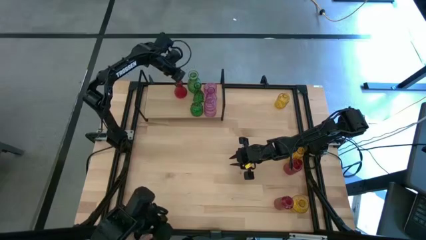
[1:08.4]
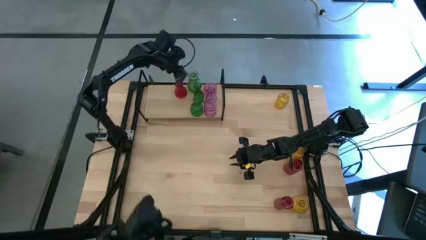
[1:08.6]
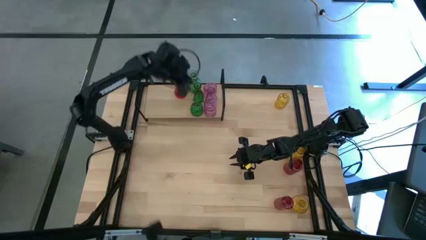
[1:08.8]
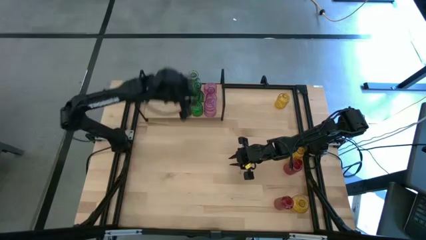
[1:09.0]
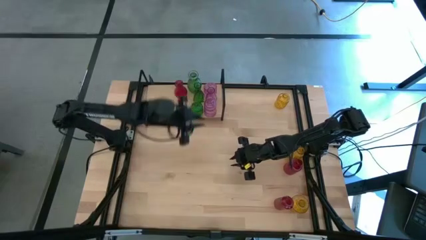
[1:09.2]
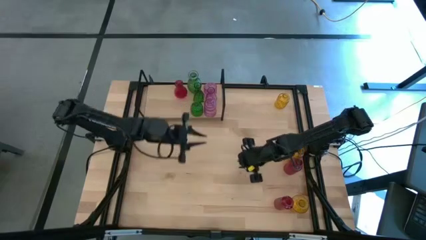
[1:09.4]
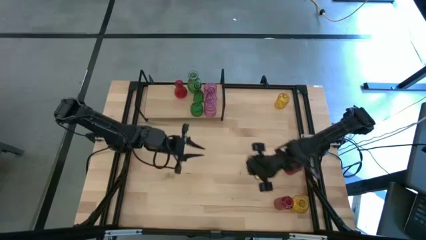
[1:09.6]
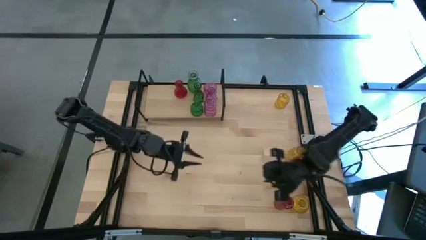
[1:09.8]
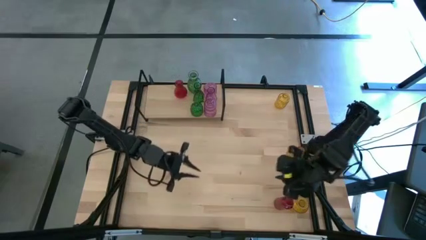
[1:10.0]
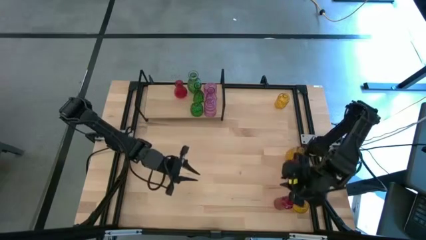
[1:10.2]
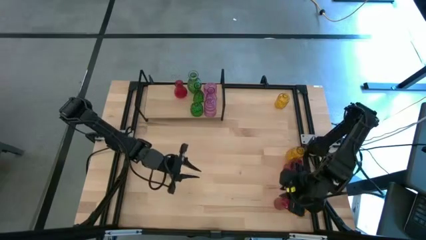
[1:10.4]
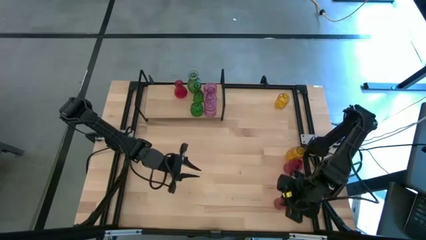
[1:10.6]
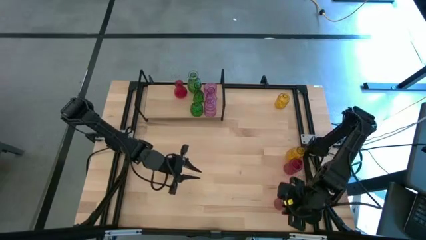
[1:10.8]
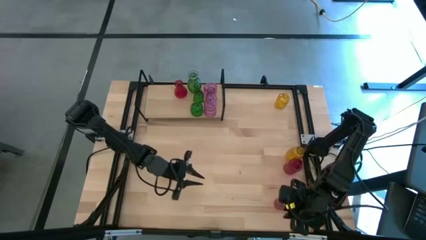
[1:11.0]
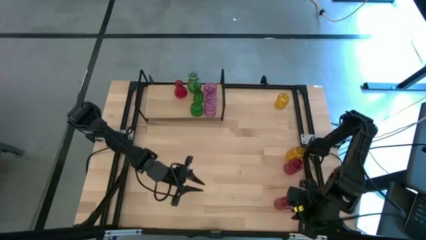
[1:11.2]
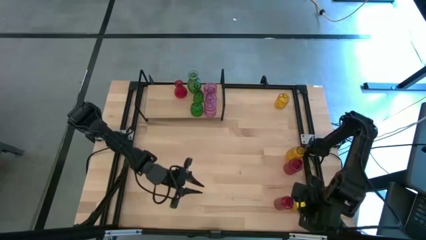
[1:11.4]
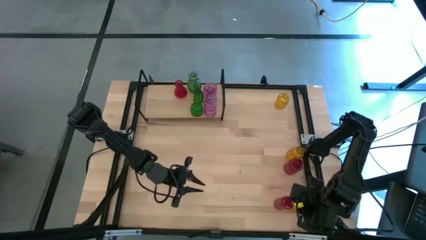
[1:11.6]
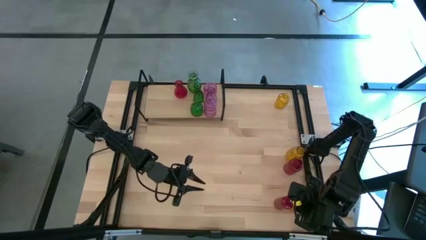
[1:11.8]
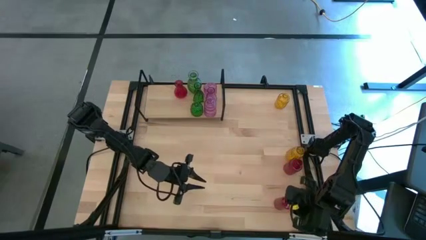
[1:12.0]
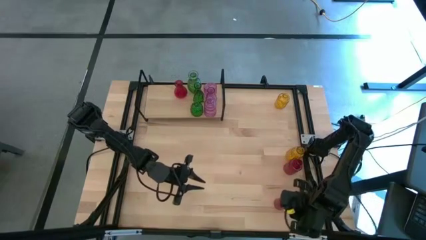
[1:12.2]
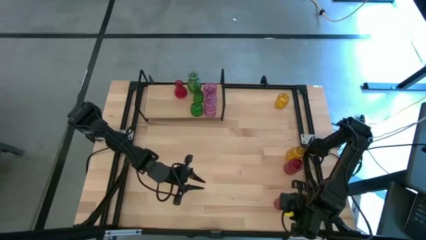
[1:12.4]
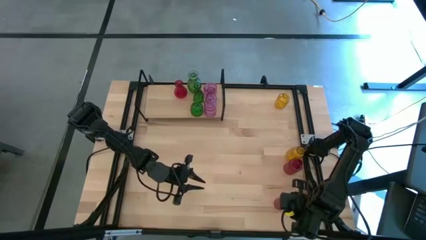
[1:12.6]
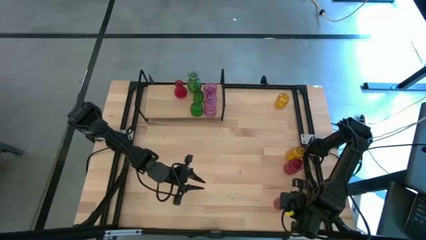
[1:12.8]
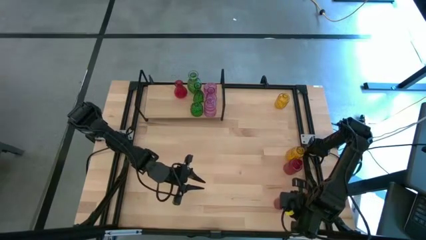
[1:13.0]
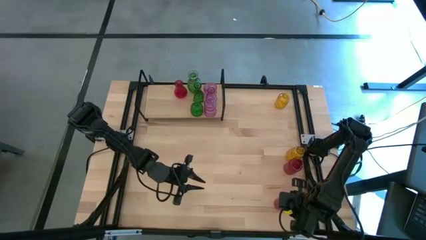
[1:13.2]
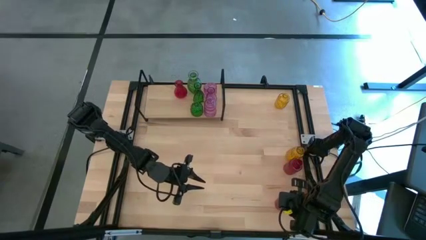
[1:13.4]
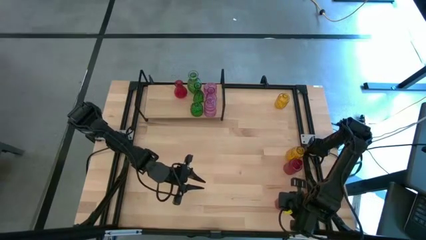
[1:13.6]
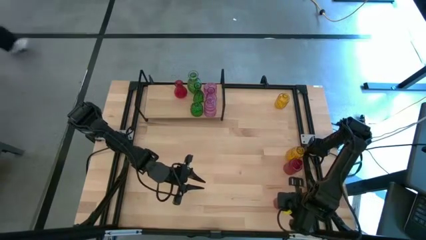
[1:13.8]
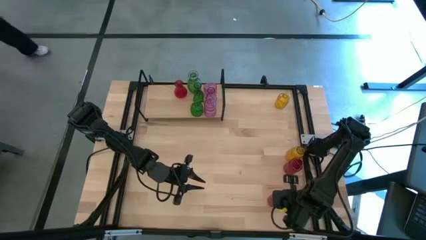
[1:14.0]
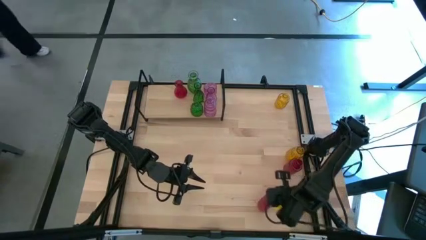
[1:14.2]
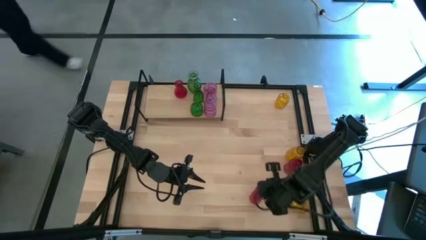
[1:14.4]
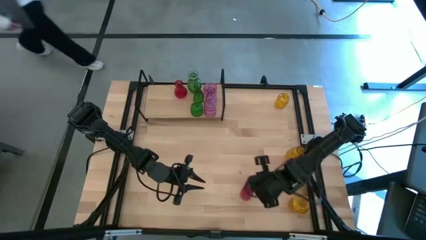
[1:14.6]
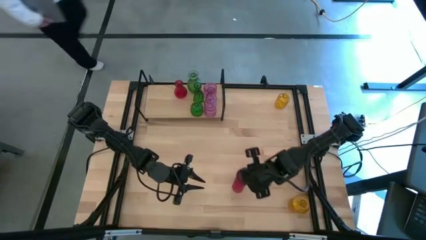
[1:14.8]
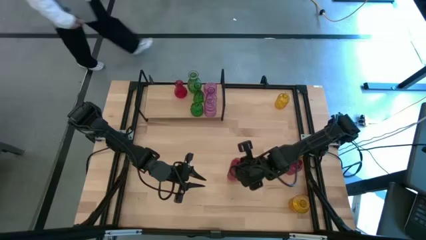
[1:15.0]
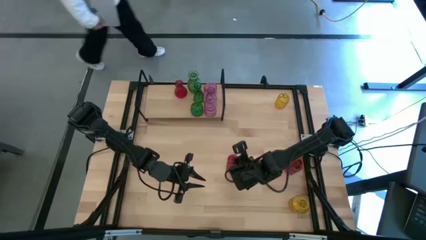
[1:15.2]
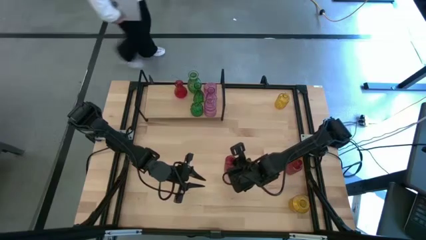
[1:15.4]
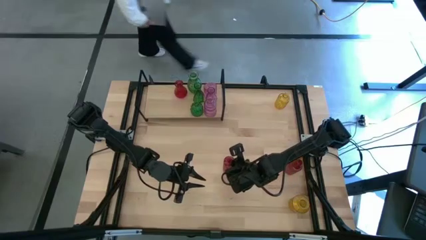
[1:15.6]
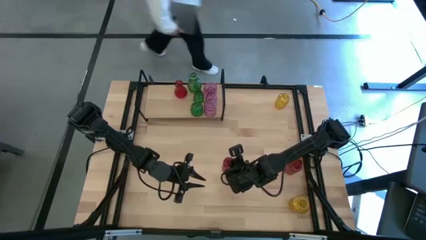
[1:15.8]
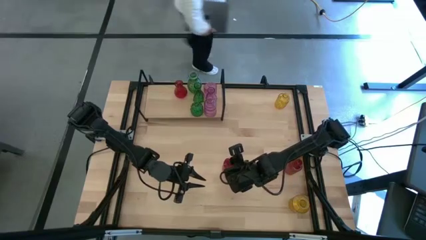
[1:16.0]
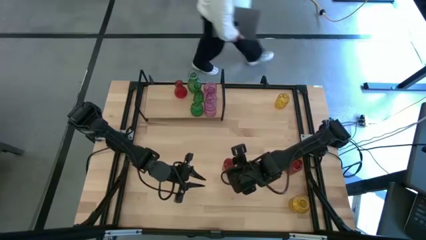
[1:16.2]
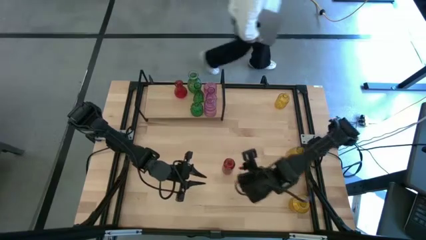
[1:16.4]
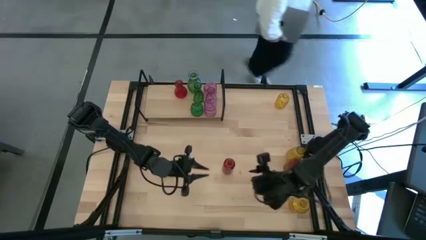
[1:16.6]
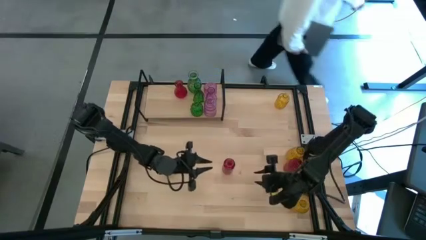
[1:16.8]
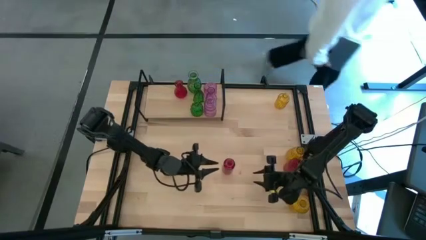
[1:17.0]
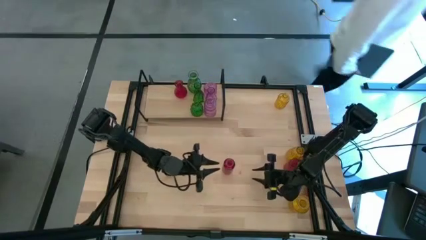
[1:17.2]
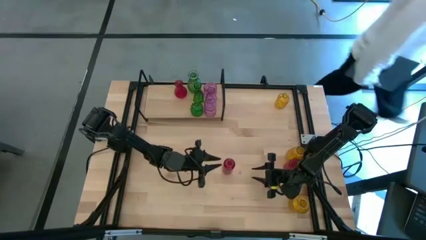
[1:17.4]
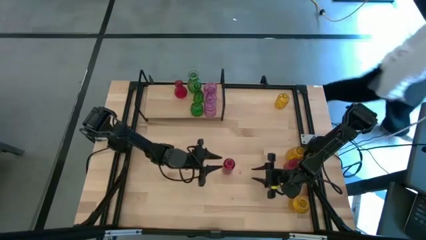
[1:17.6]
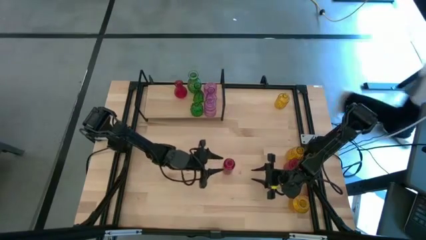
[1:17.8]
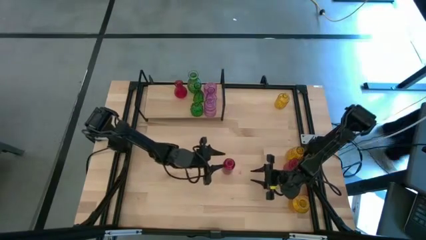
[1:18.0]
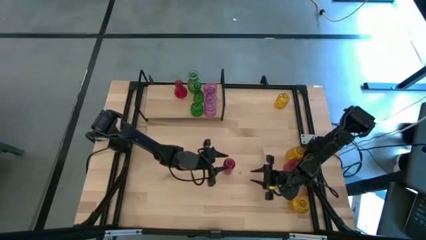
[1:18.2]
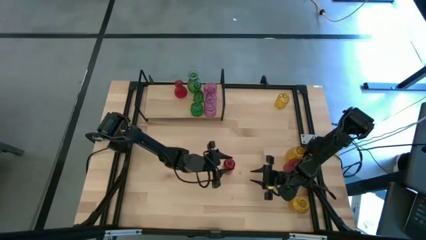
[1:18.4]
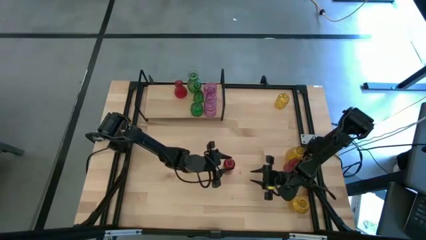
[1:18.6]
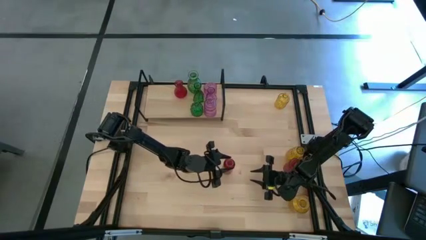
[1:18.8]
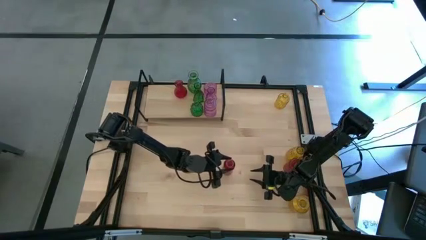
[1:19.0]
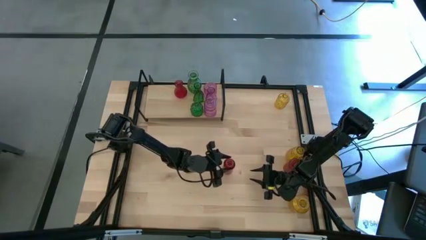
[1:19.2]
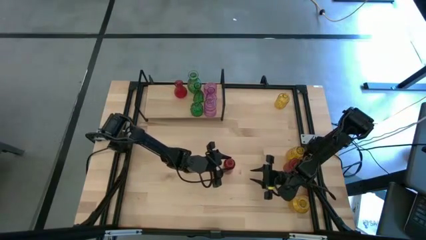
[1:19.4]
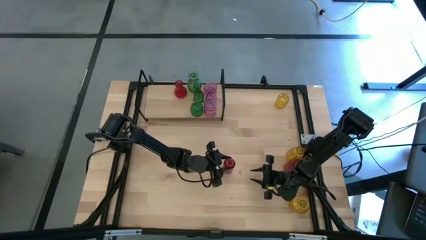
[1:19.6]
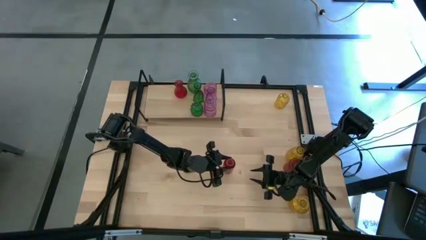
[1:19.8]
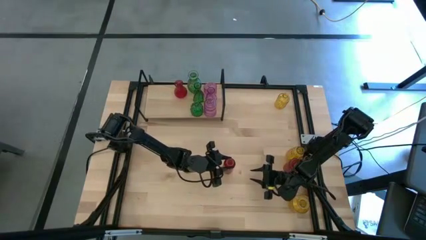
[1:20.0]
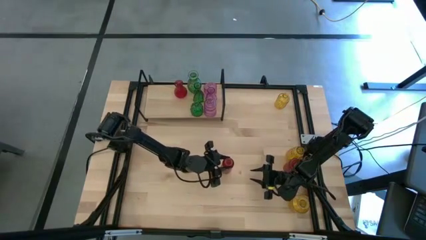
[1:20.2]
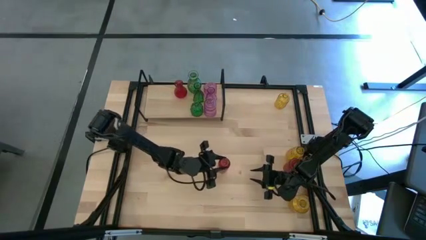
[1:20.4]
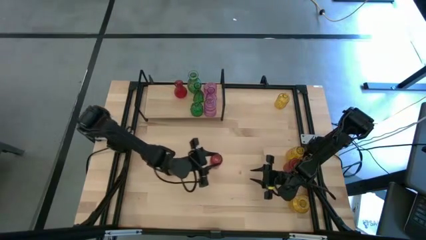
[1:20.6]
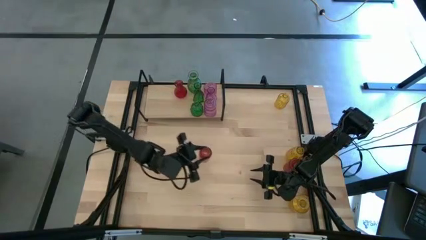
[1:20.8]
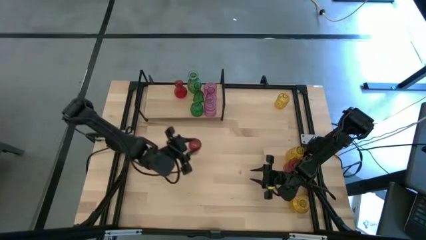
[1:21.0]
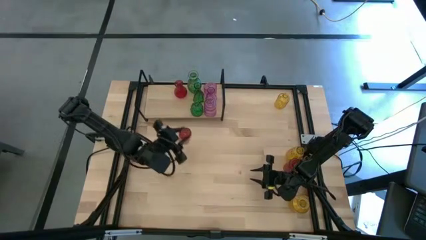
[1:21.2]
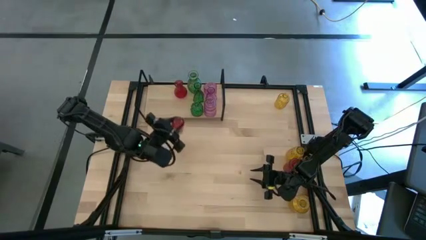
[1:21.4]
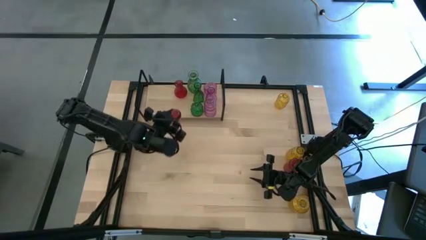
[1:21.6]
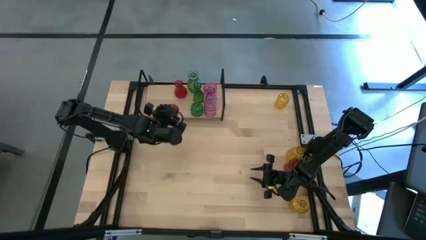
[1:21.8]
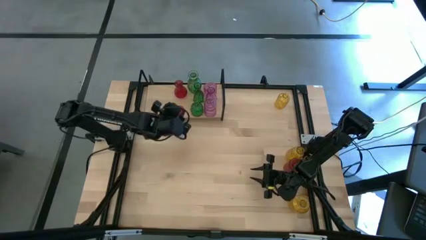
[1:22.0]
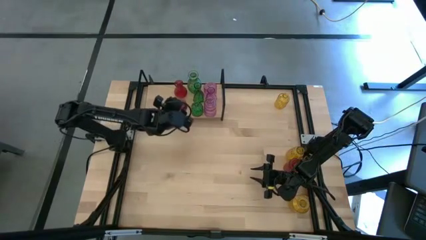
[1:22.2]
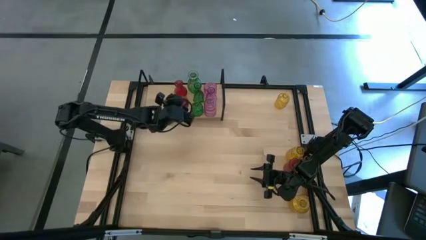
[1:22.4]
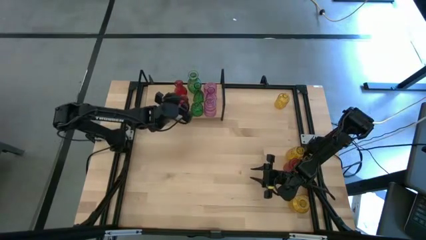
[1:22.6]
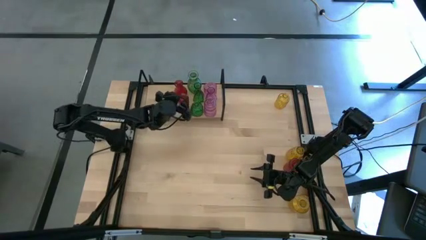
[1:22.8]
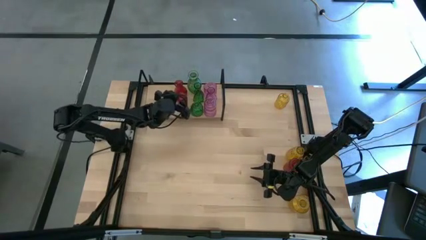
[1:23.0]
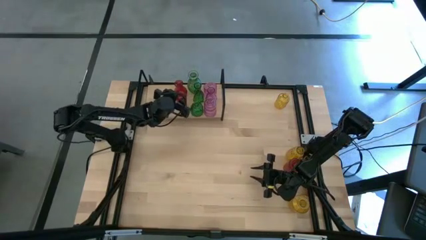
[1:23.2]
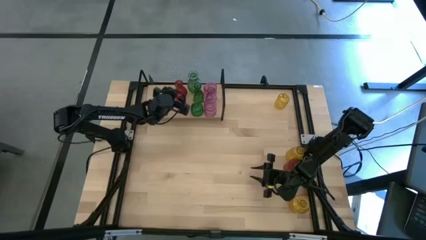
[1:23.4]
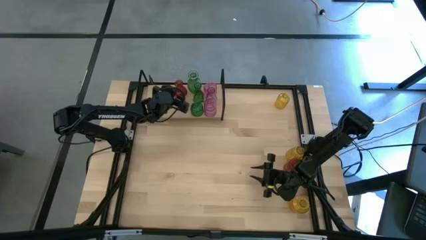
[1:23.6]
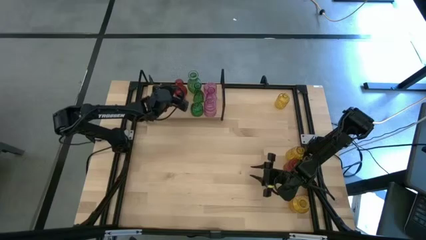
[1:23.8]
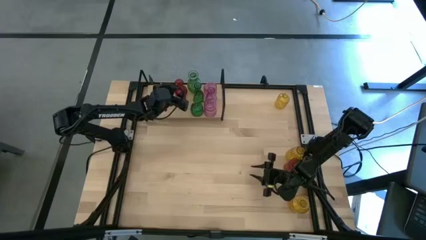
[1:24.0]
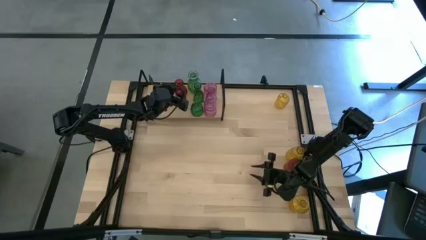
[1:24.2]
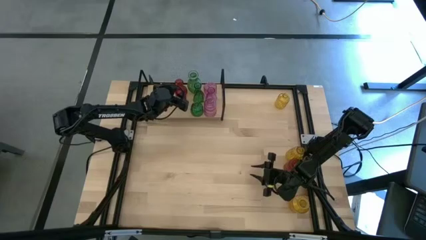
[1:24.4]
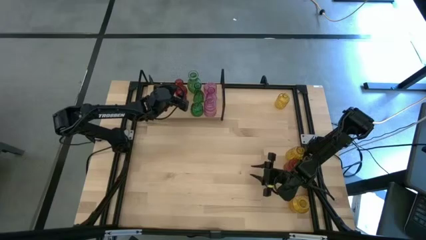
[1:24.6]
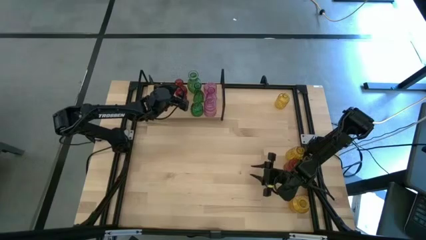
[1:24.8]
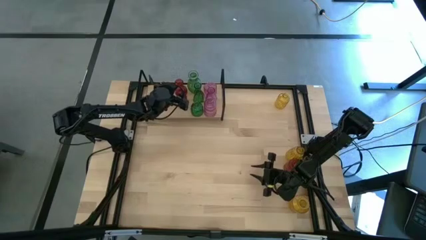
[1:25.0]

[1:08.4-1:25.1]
Task: sort vases onto shelf
Put the bottom red vase on the shelf aligned with the other red vase

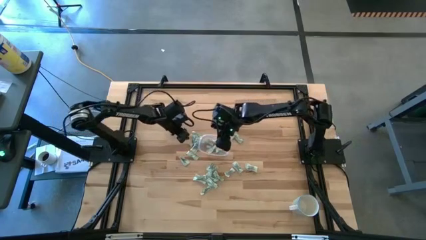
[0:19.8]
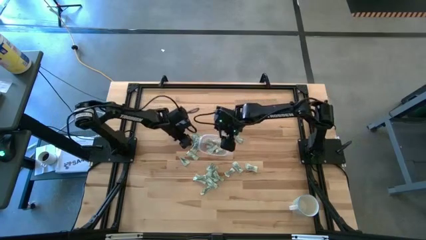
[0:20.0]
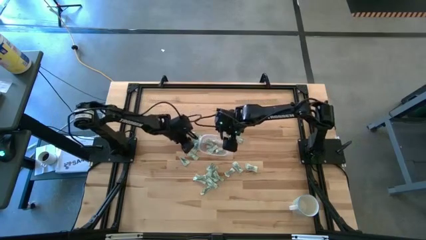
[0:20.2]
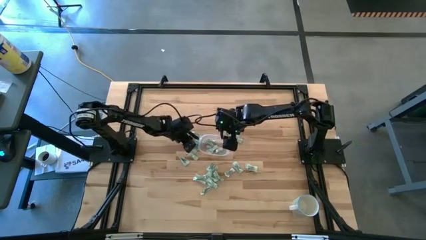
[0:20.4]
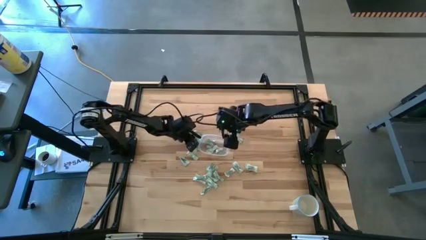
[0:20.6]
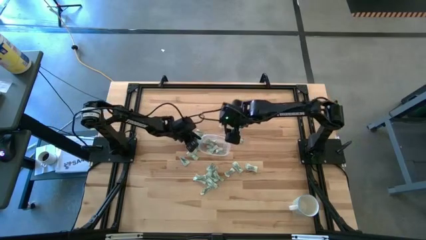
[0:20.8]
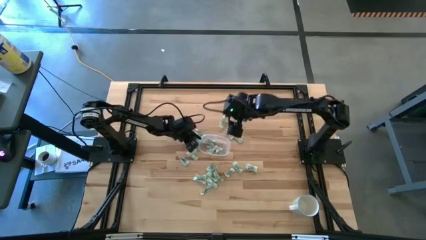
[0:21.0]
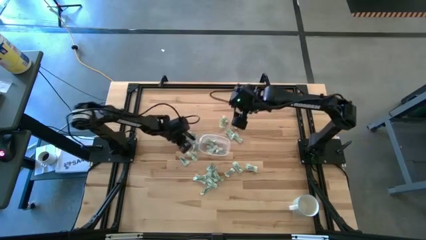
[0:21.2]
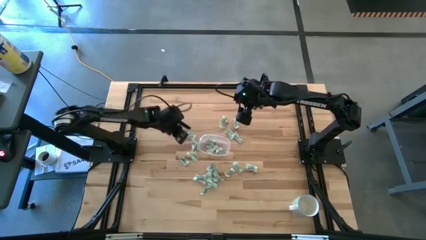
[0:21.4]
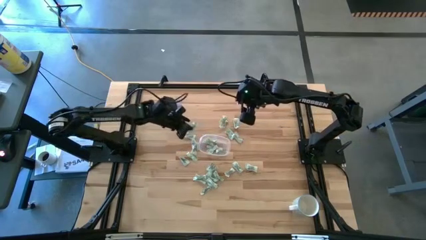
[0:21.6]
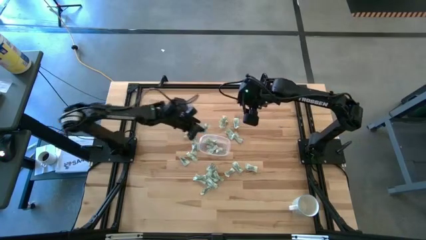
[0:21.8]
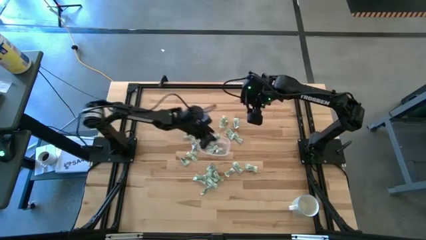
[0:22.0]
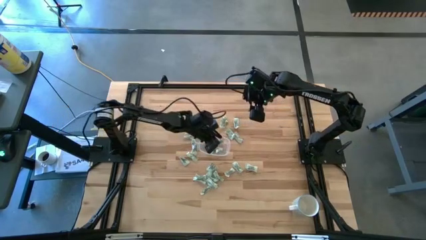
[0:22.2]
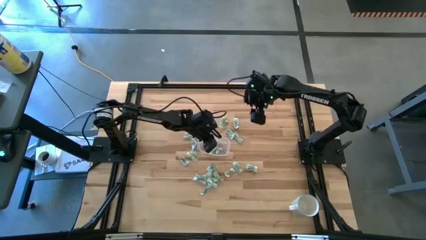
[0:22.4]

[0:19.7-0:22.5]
Task: Pick and place Stevia / Truvia into bins
Put the stevia packet into the transparent container
